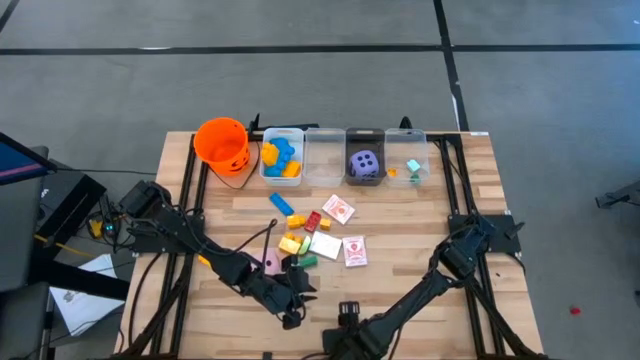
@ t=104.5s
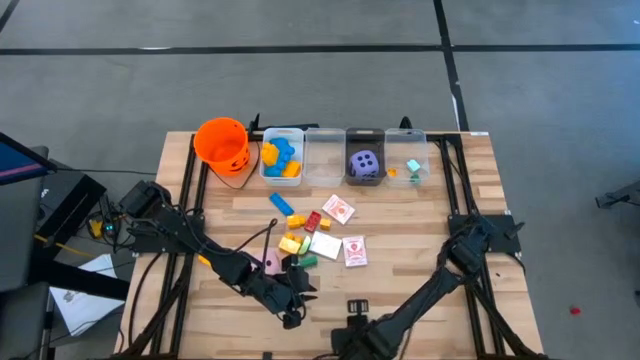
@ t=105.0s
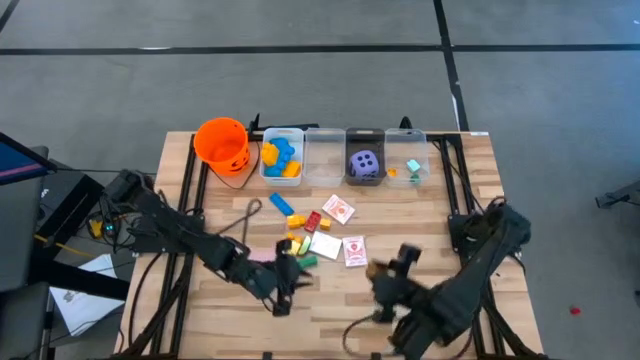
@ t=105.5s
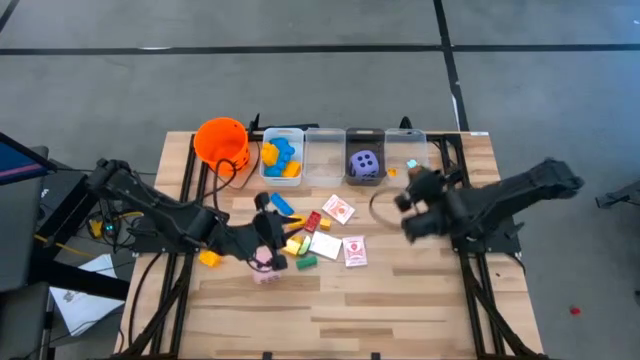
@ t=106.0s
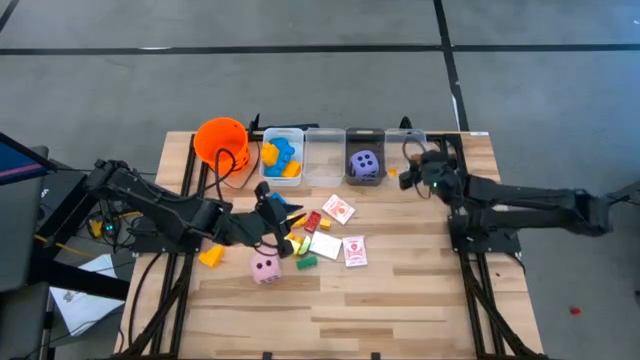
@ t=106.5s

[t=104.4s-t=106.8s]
Task: Pick & Place Toys
Put the brown game piece into the right transparent bin

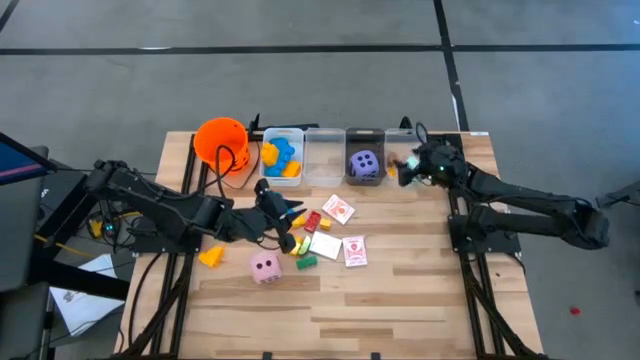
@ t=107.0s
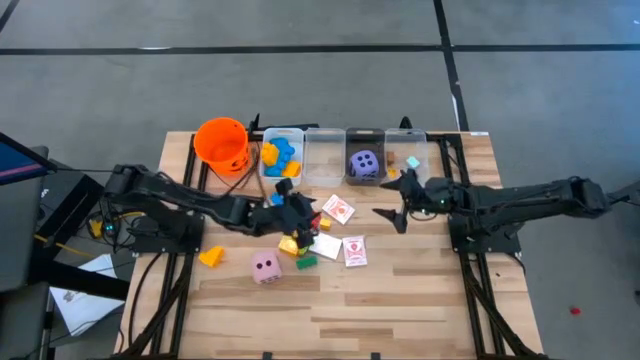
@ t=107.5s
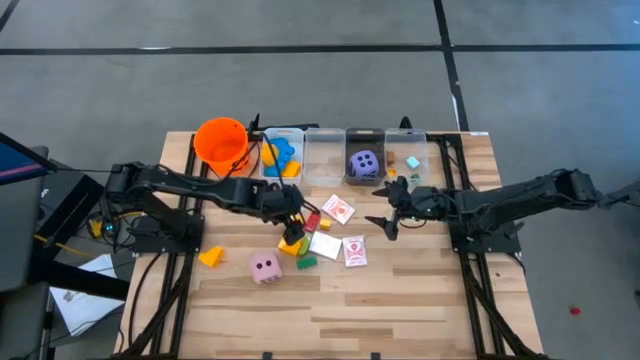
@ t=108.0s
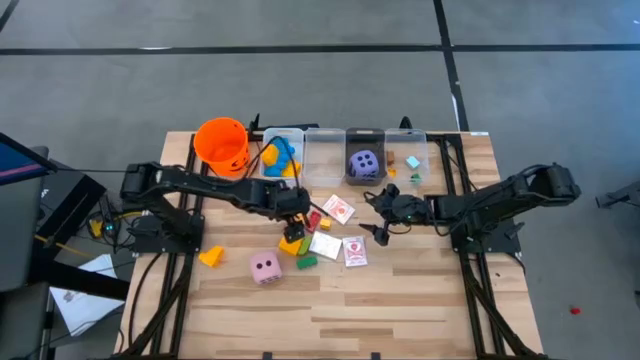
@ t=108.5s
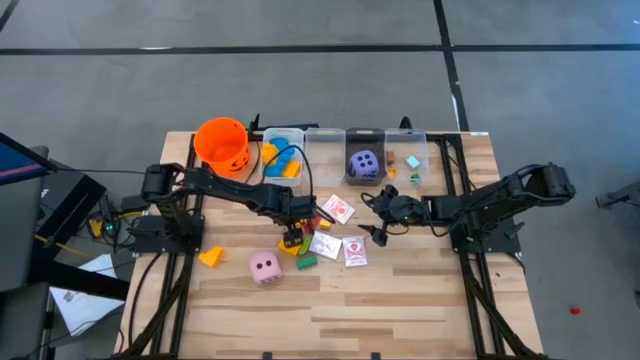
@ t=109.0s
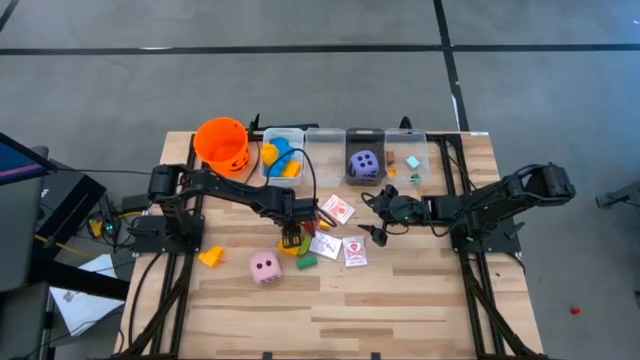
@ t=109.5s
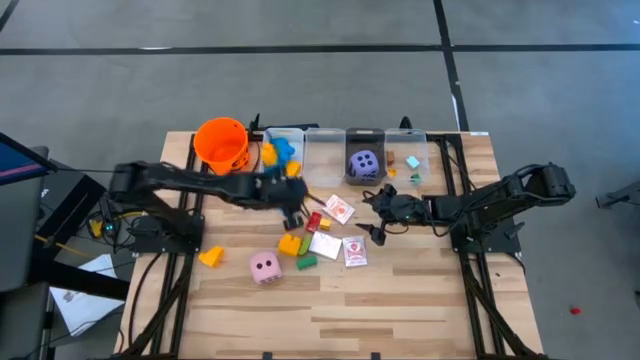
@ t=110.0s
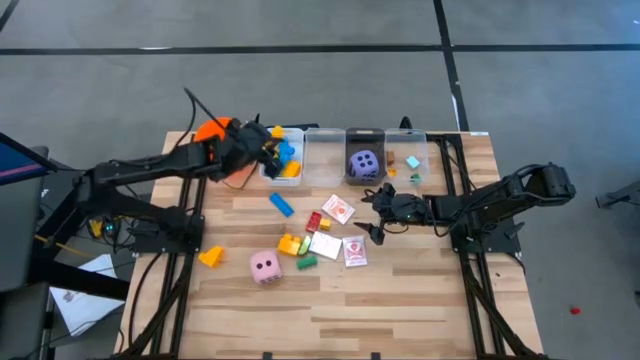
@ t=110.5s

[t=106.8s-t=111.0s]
Put the top right big yellow game piece into the white bin

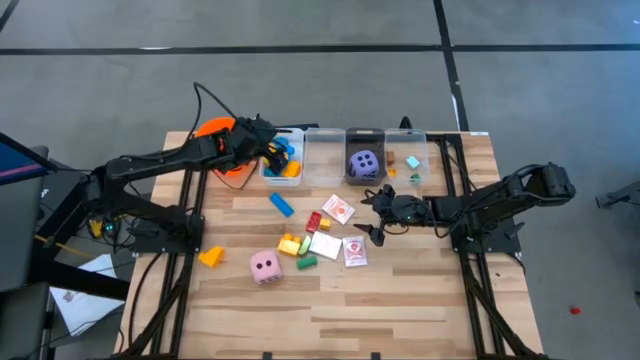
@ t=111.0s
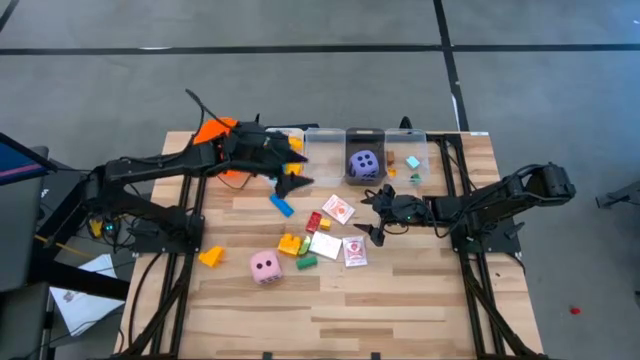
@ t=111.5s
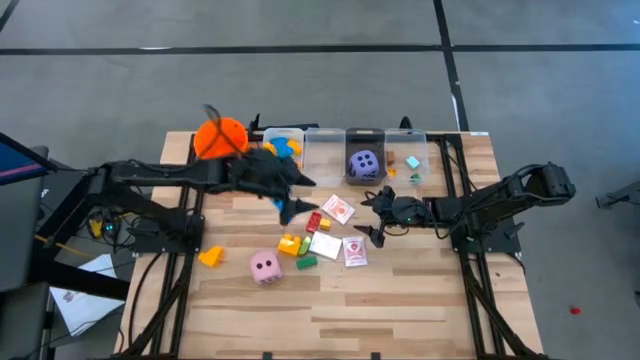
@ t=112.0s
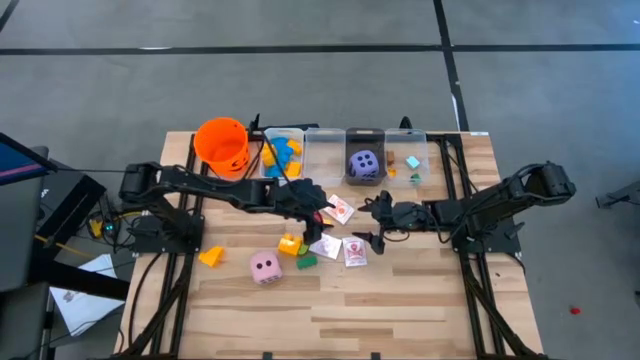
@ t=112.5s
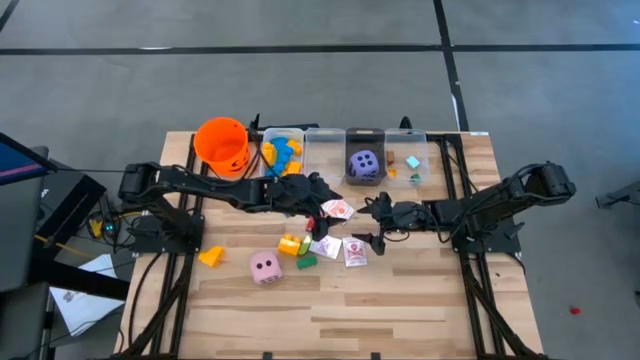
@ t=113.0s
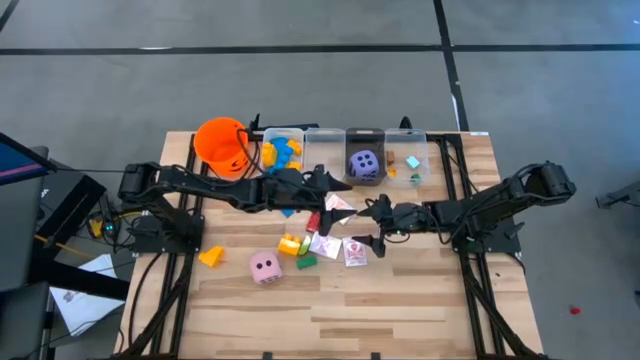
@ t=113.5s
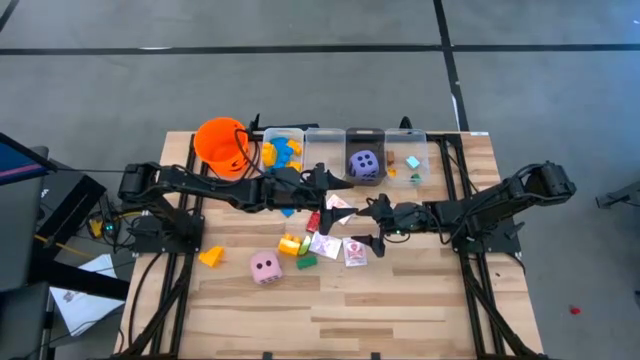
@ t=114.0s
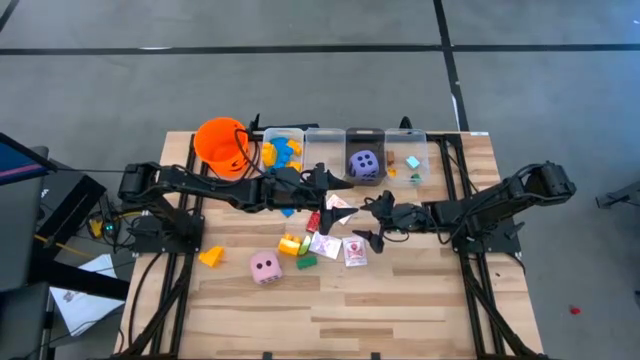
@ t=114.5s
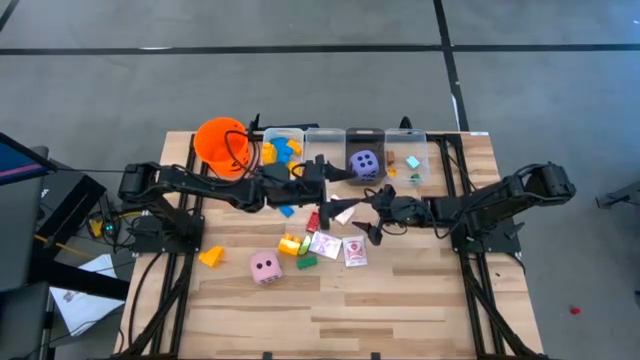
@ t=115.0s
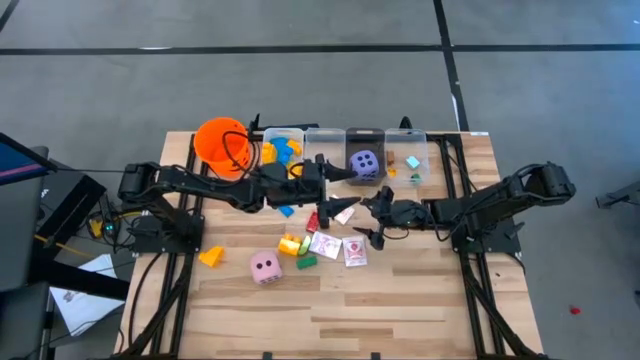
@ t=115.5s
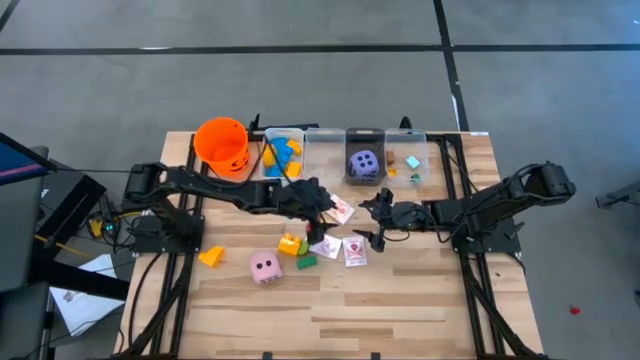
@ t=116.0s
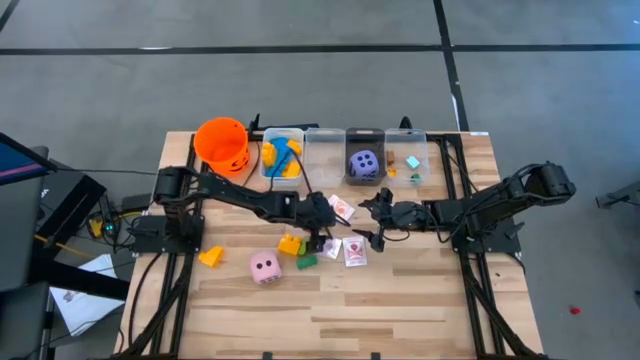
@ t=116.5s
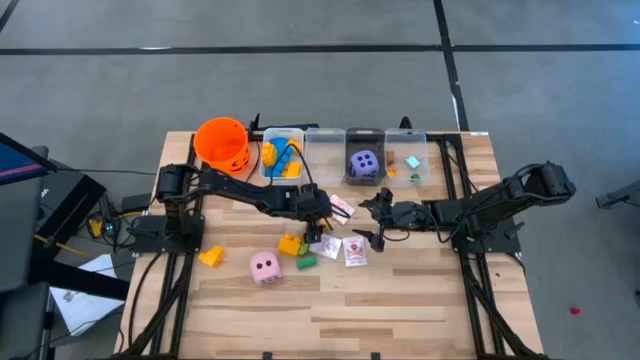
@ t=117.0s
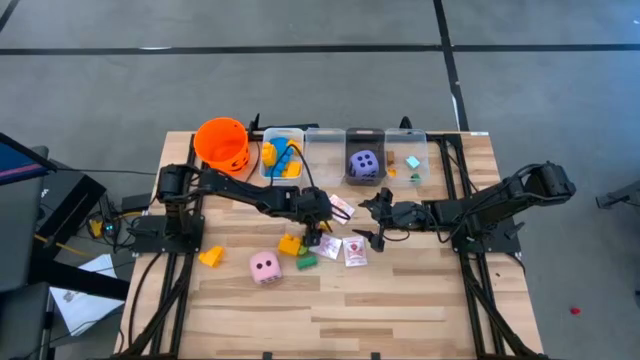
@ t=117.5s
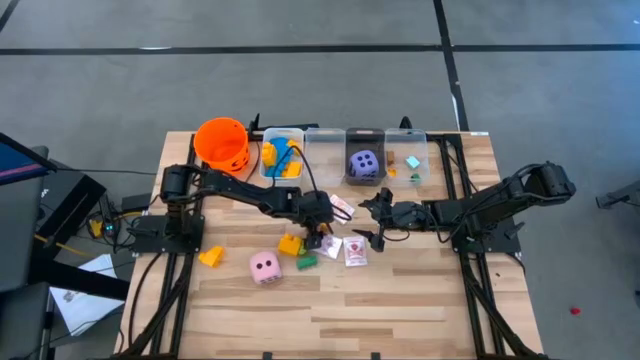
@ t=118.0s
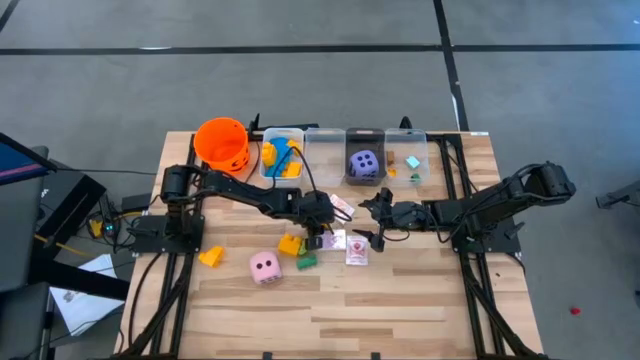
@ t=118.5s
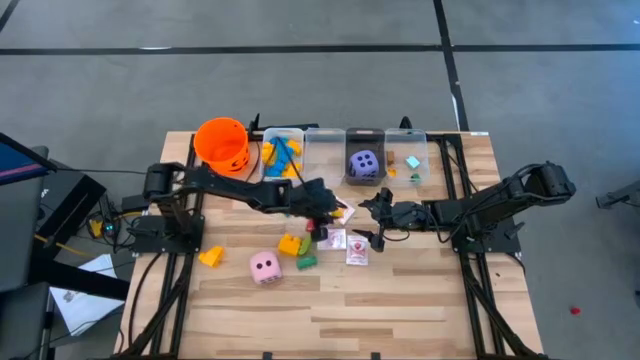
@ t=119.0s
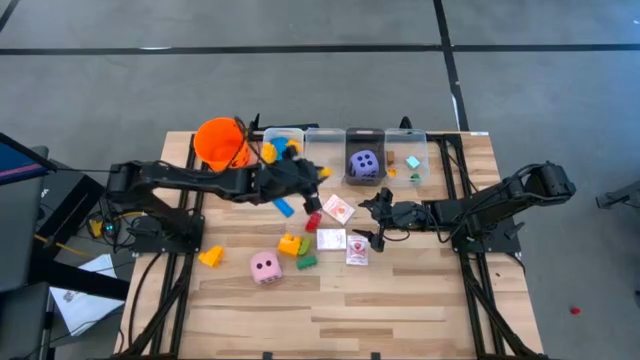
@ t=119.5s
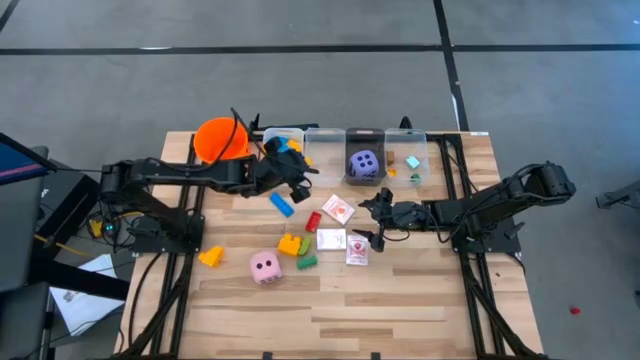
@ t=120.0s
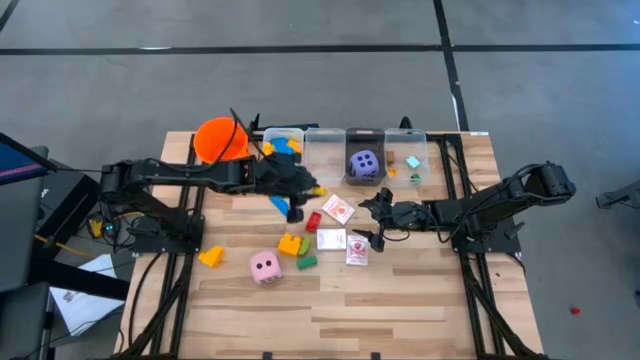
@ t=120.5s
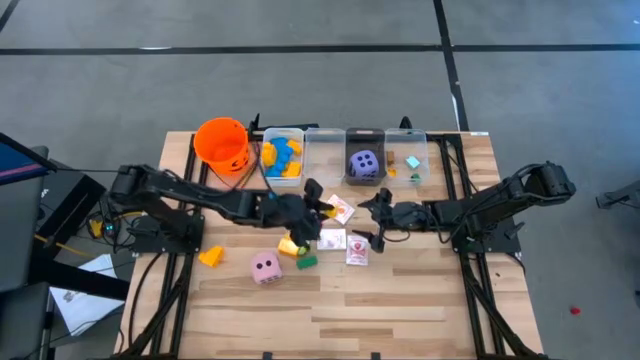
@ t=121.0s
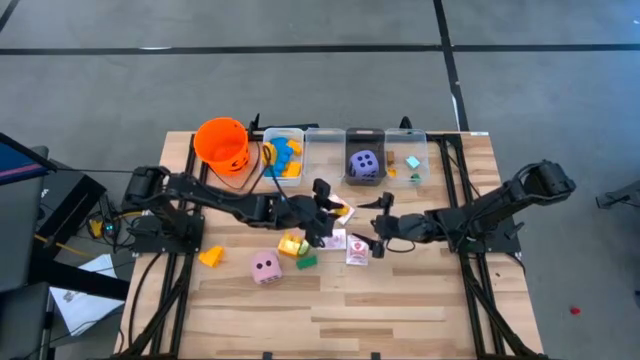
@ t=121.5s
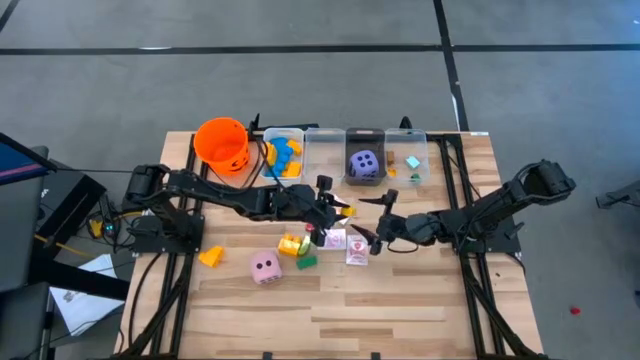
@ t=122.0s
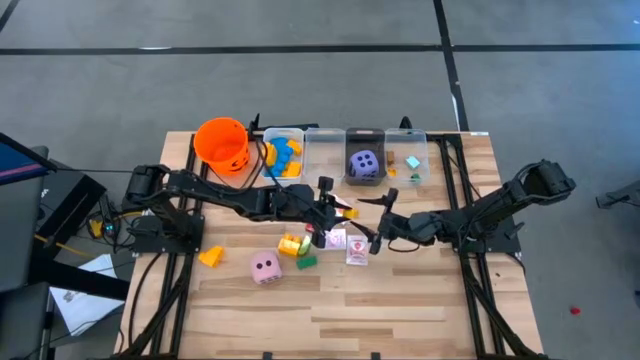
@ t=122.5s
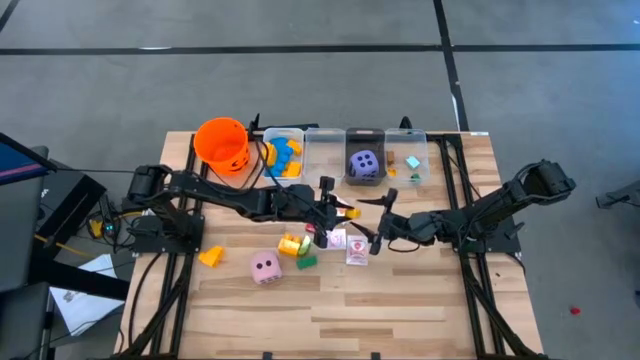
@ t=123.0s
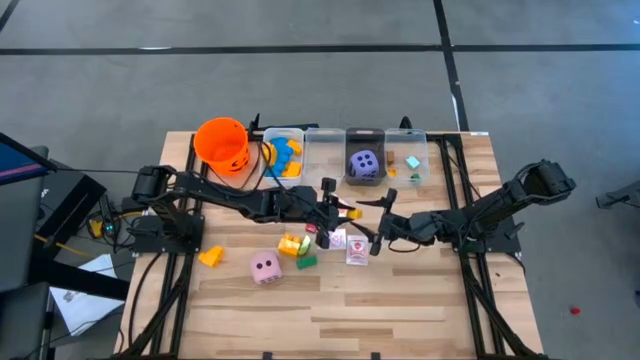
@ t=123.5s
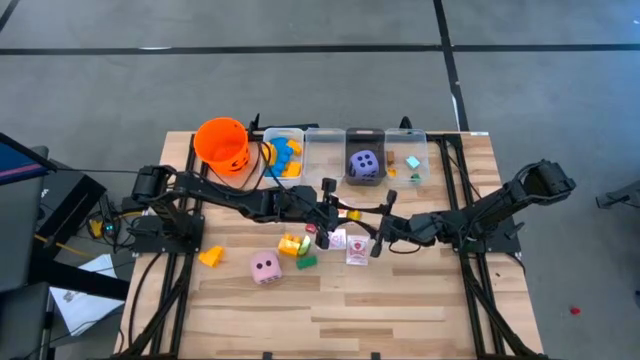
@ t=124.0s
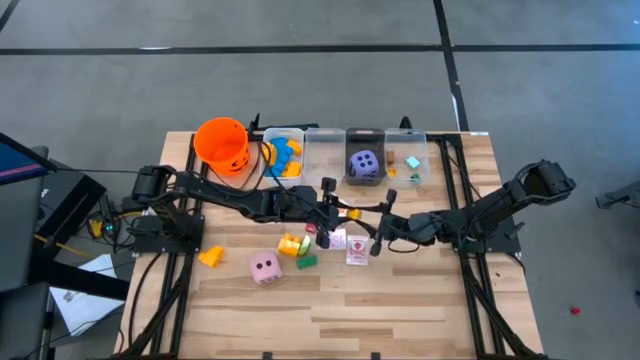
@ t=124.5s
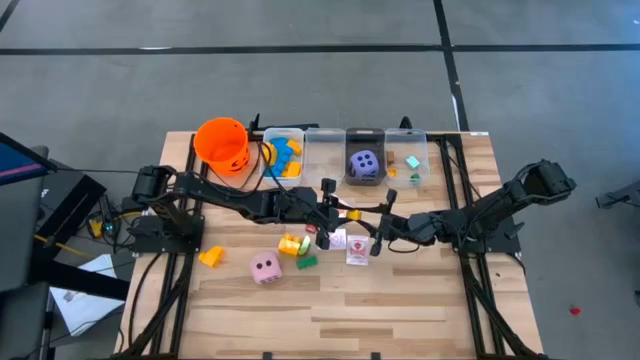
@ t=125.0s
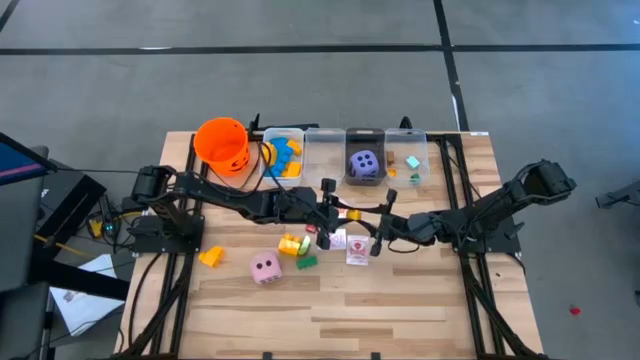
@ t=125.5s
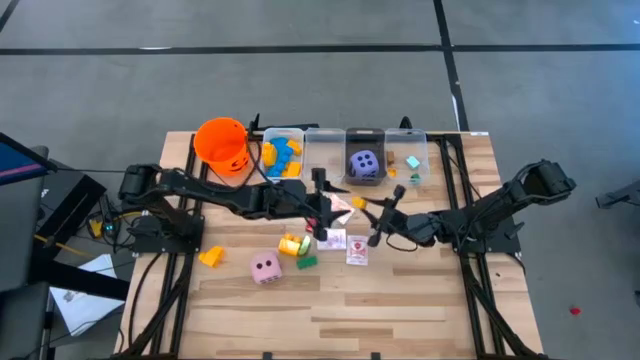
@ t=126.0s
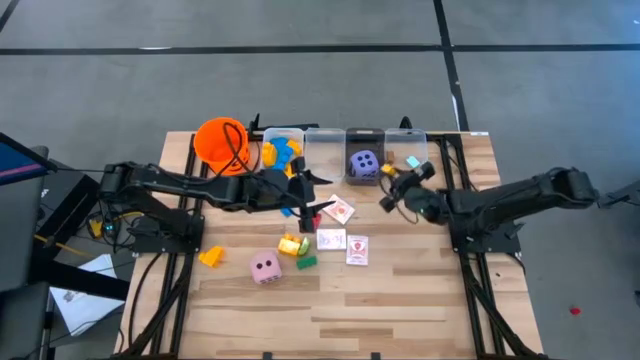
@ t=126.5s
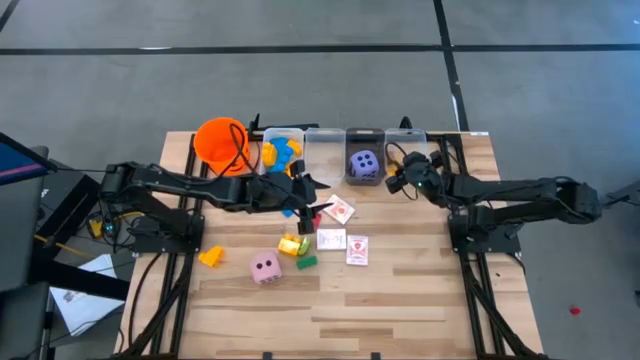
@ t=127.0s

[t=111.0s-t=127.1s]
Put the small yellow game piece into the right transparent bin
